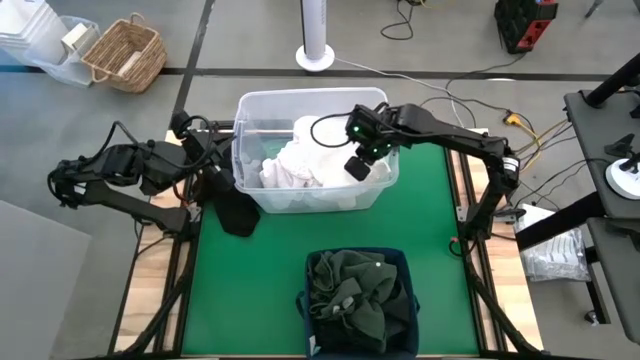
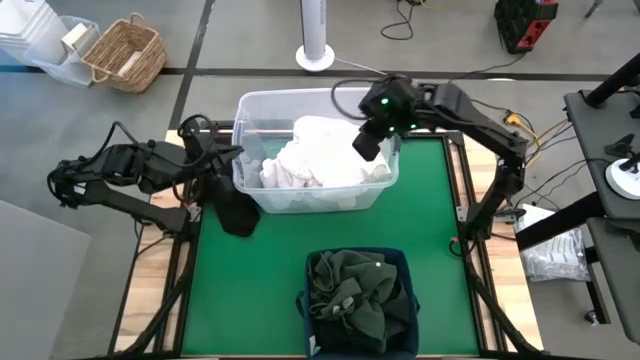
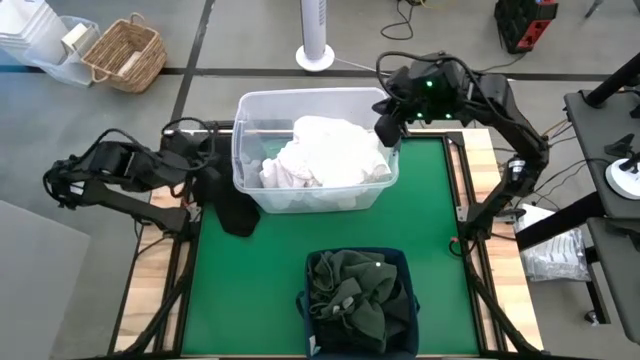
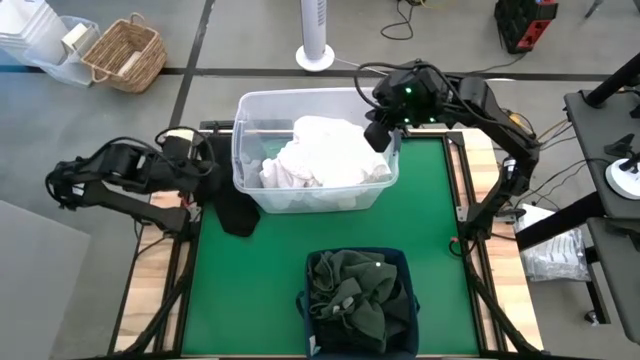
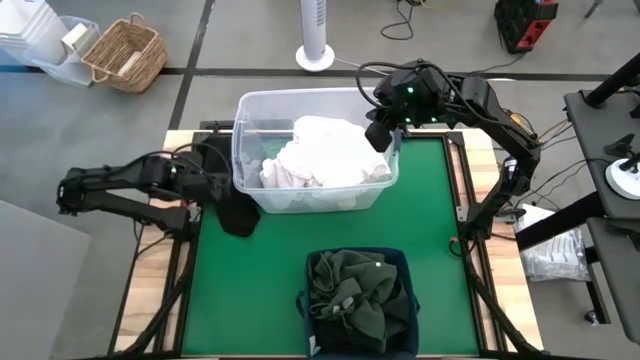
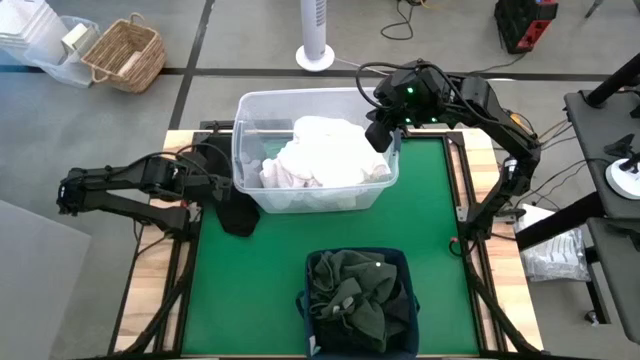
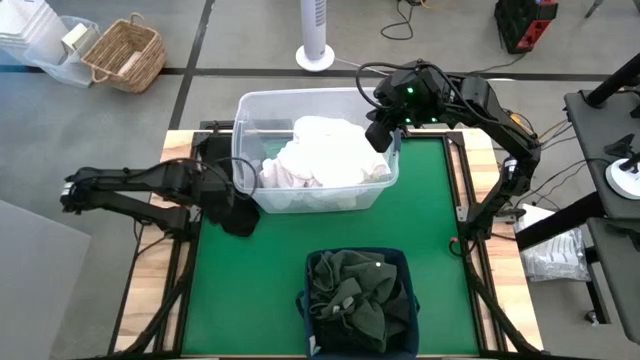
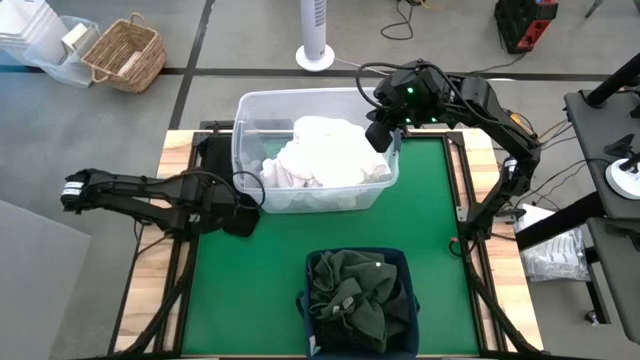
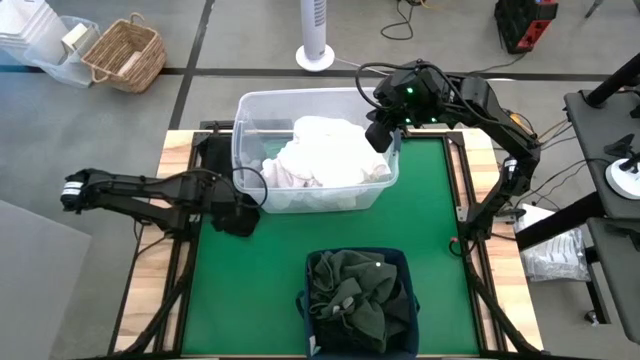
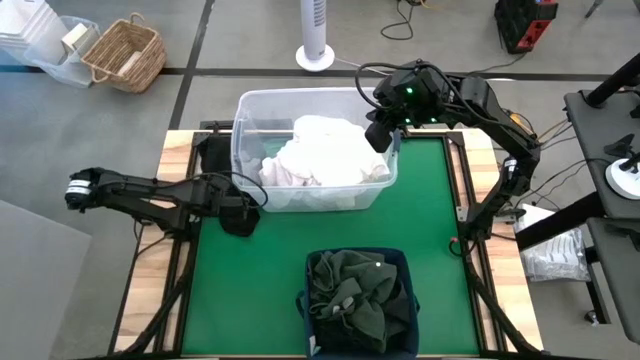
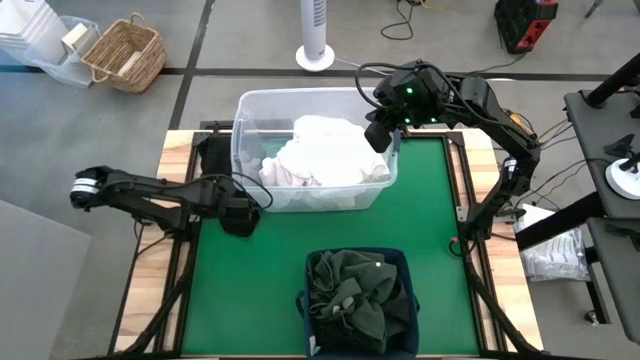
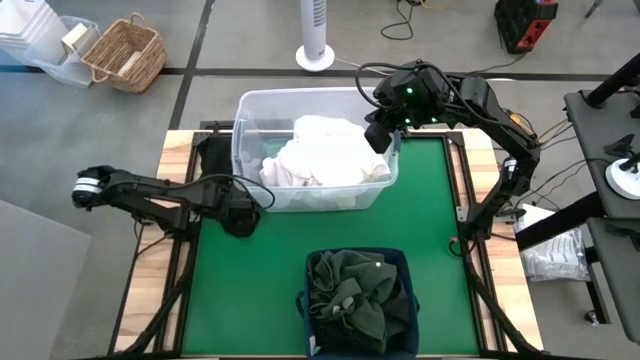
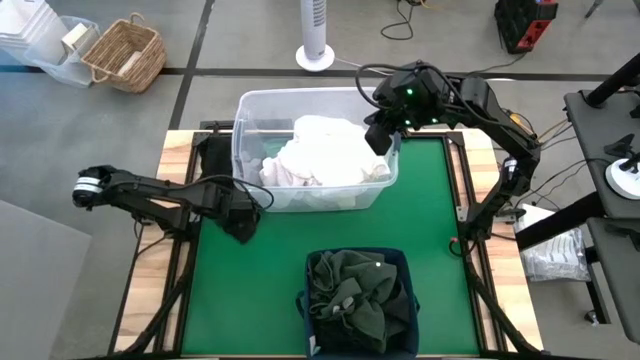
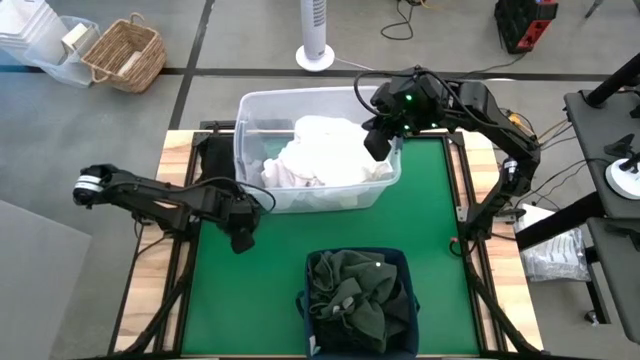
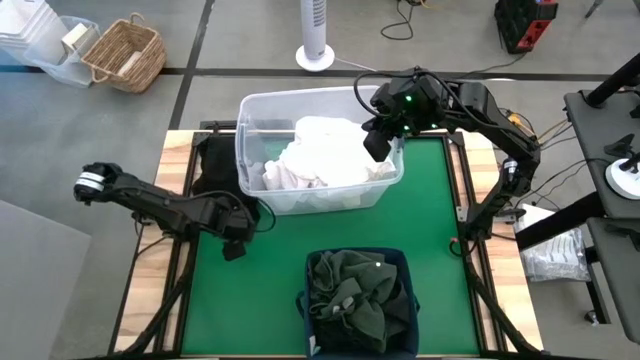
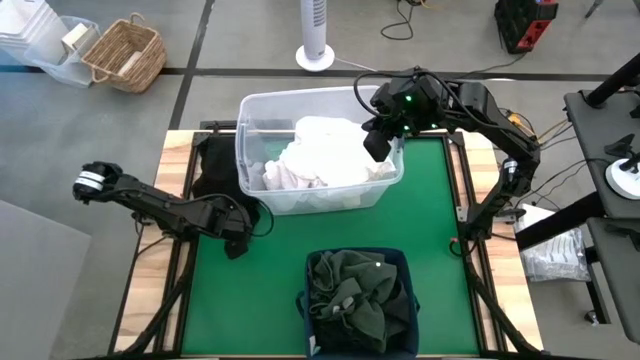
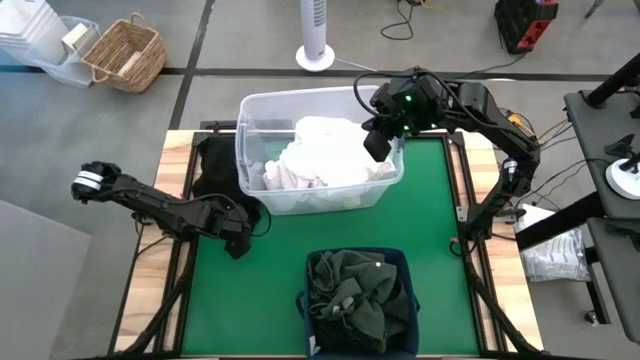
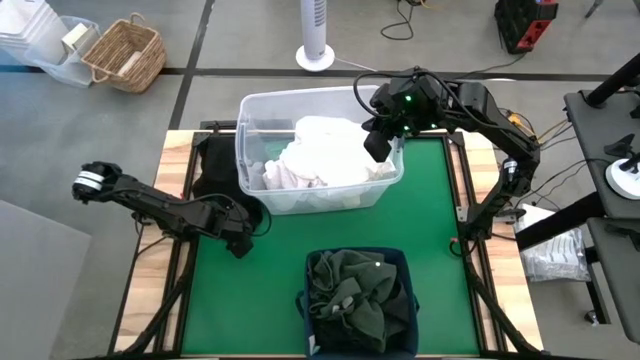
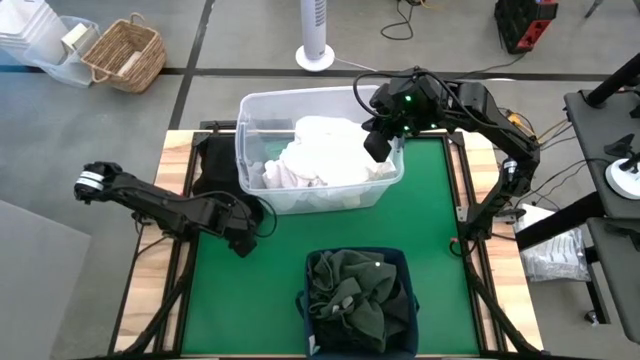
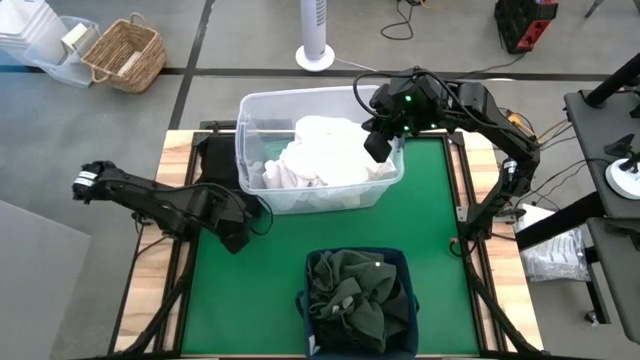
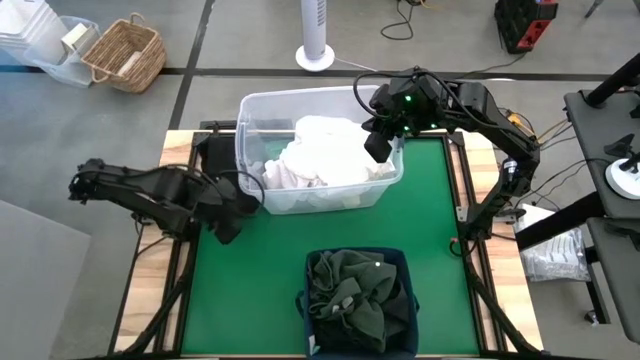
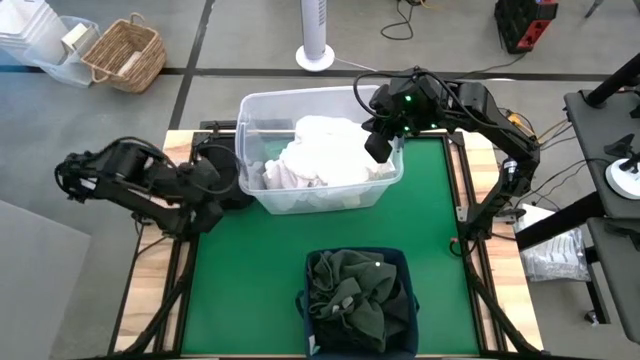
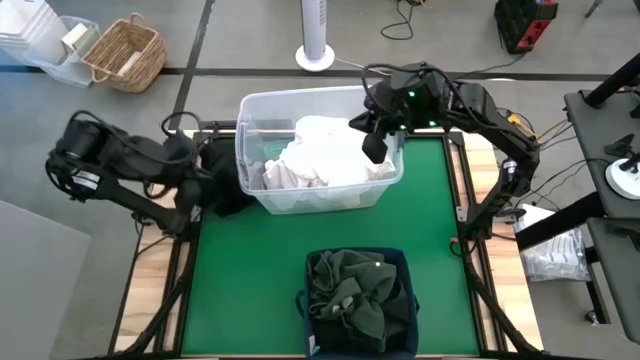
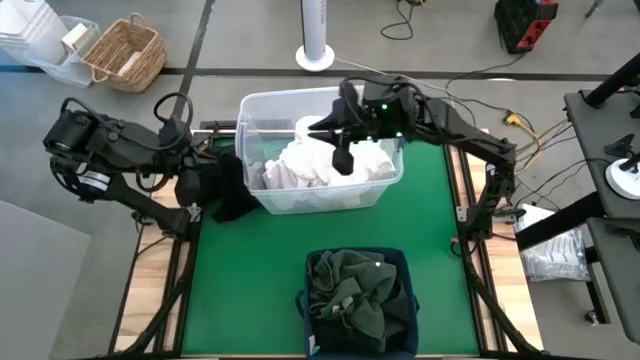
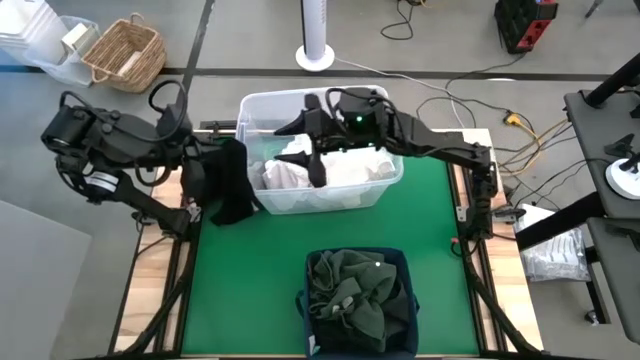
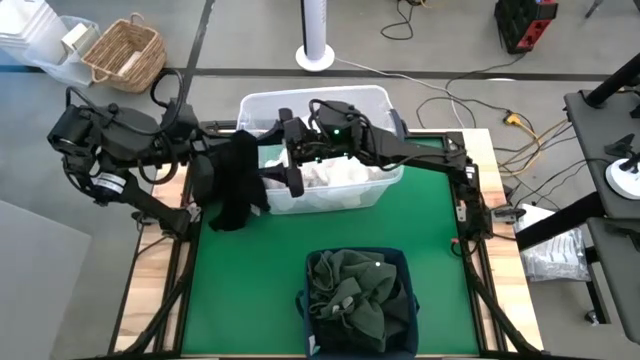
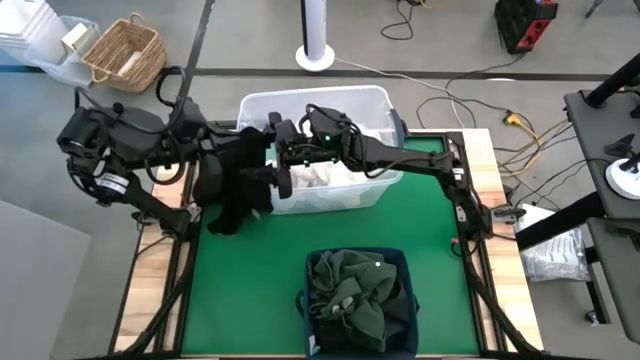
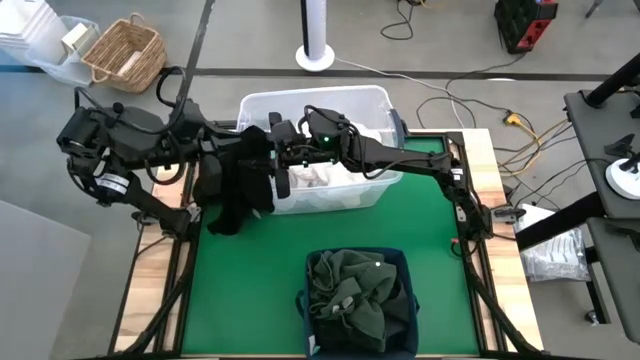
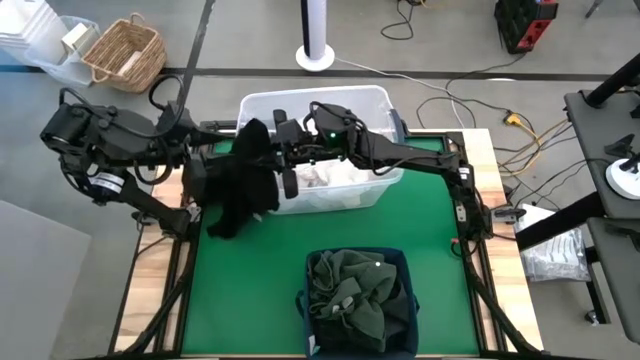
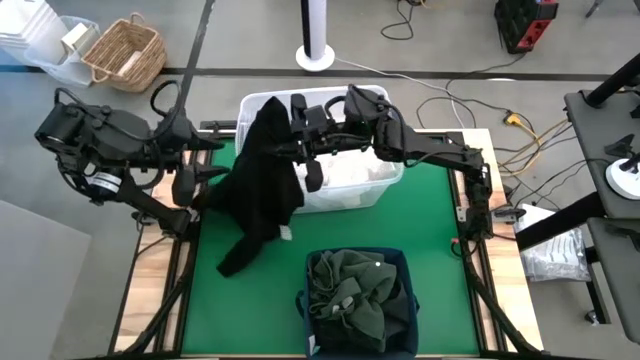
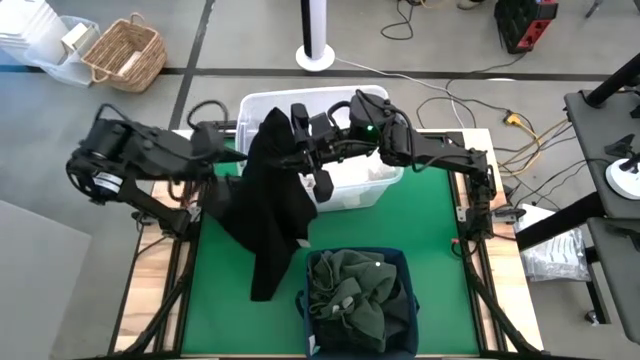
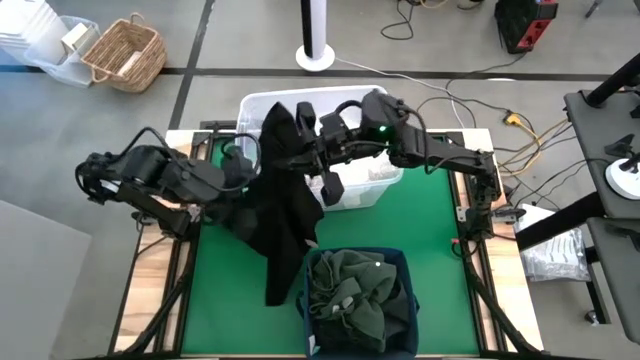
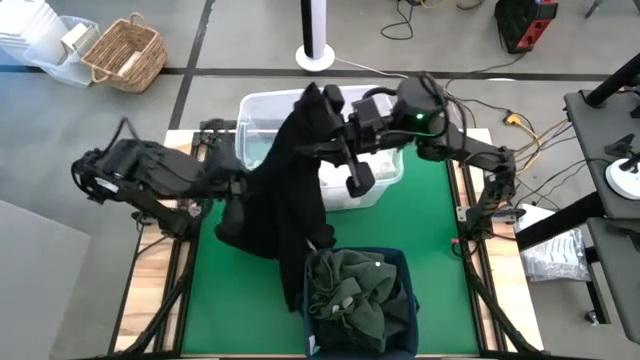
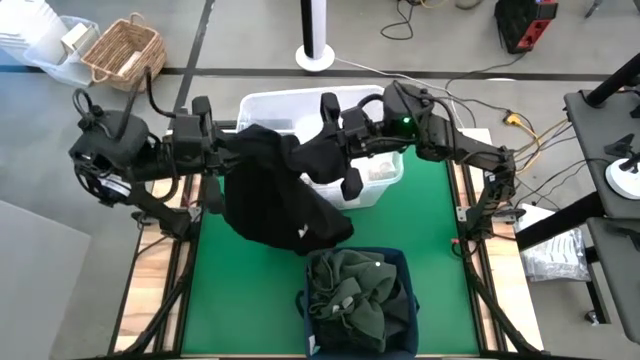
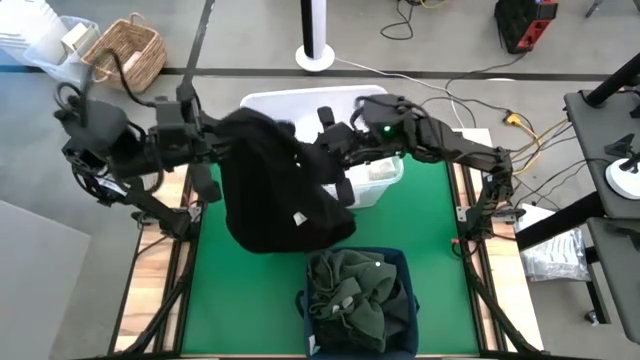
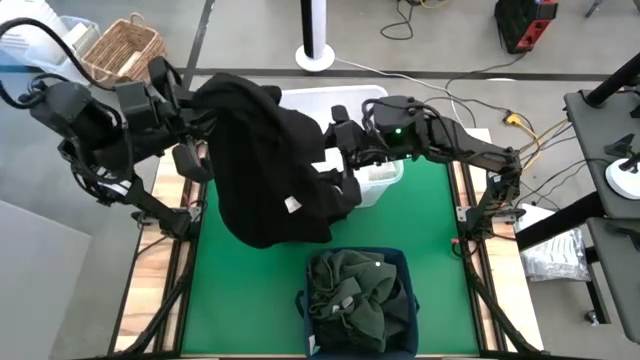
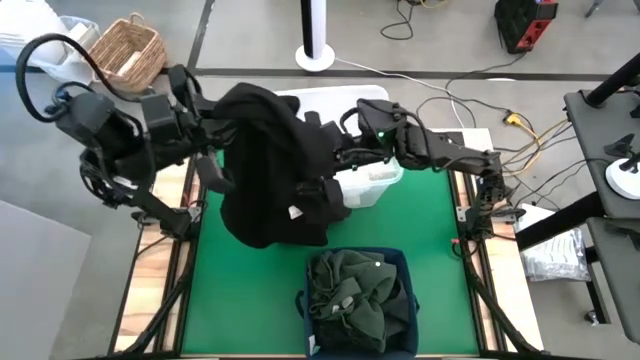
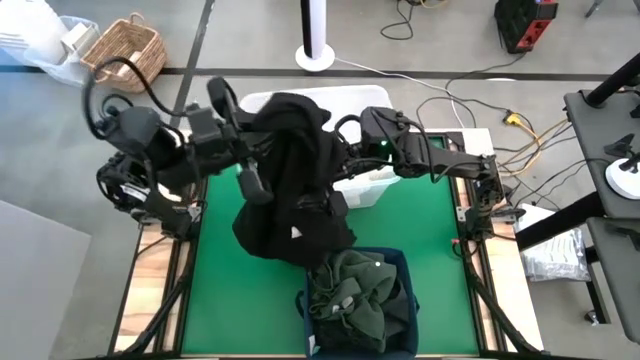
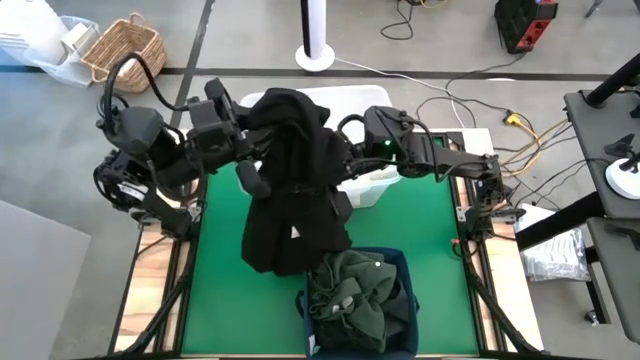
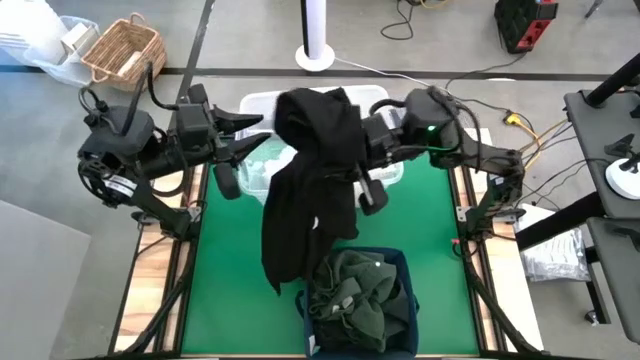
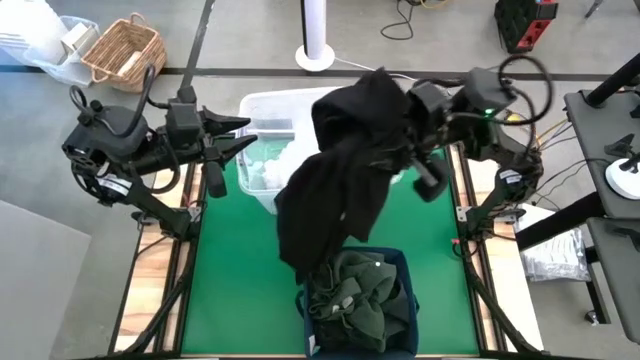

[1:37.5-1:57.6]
Put the black shirt into the blue laundry bin

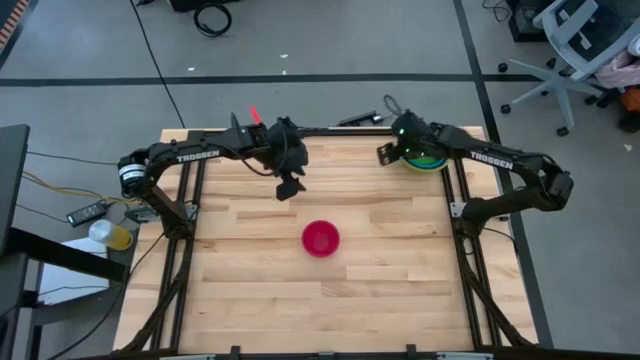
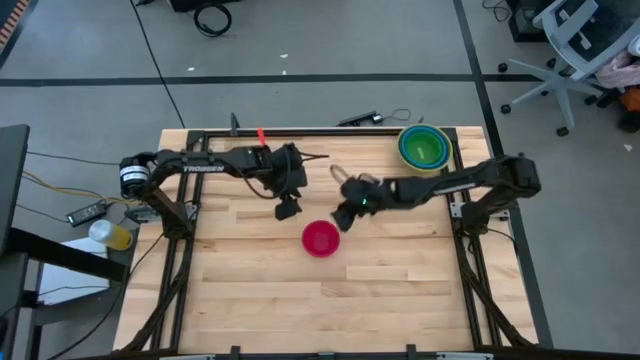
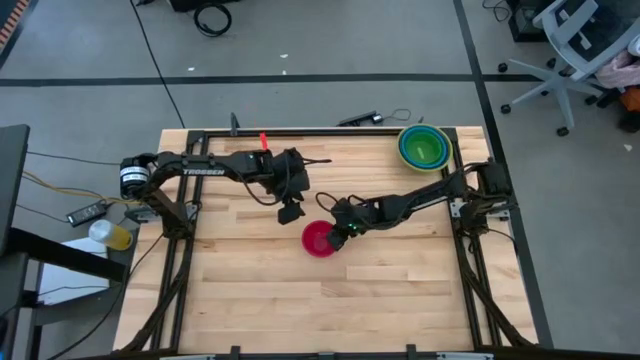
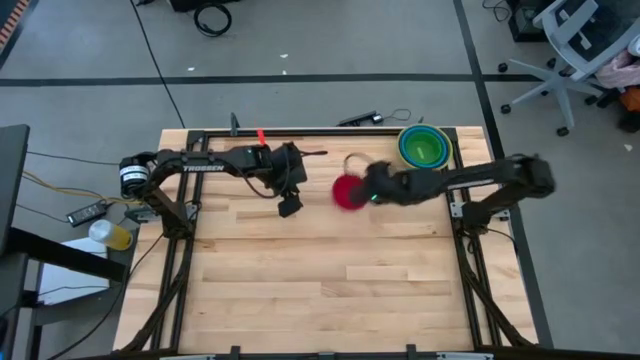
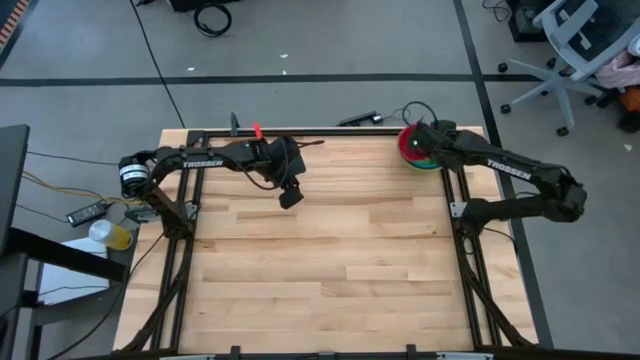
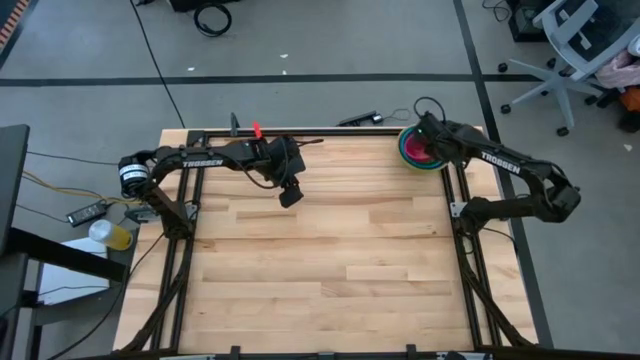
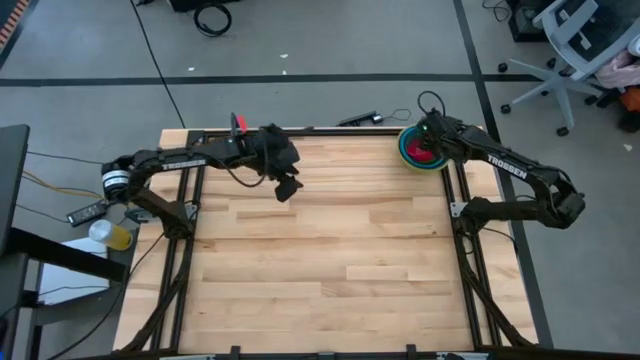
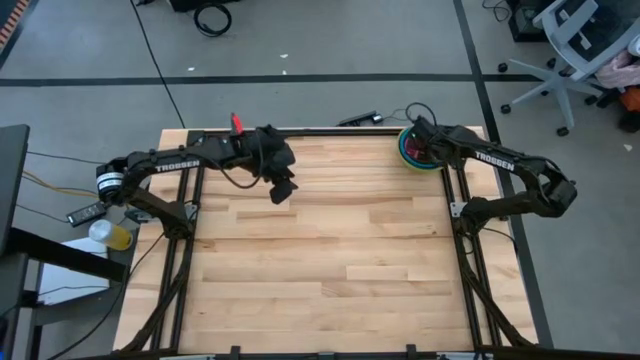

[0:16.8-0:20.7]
Stack the small red bowl on top of the small green bowl
